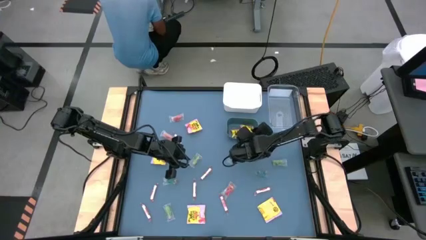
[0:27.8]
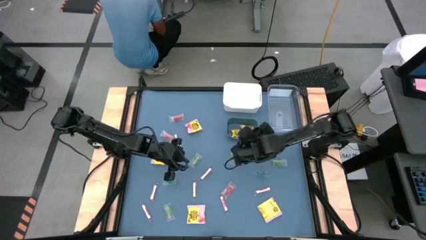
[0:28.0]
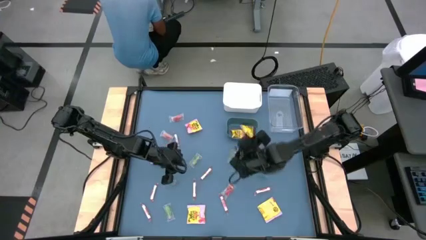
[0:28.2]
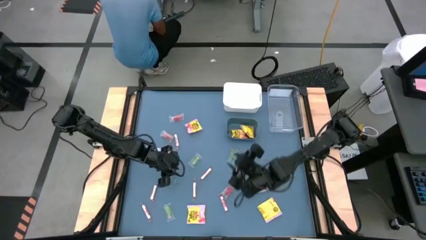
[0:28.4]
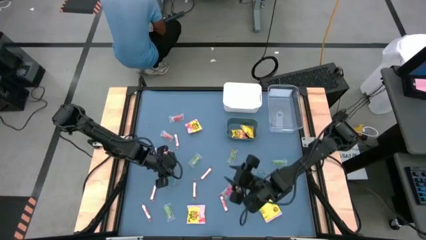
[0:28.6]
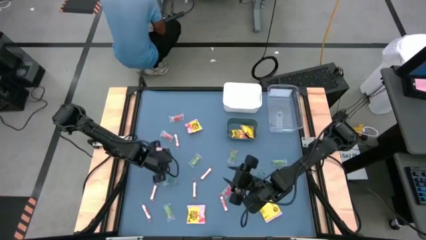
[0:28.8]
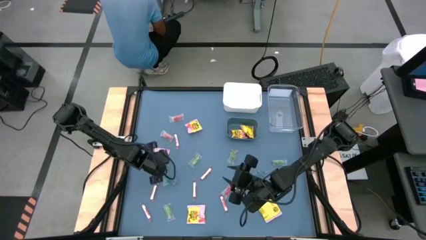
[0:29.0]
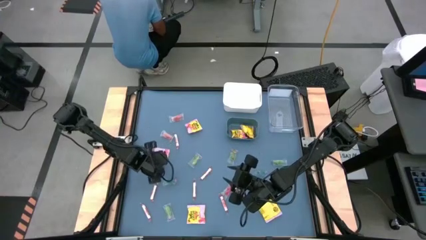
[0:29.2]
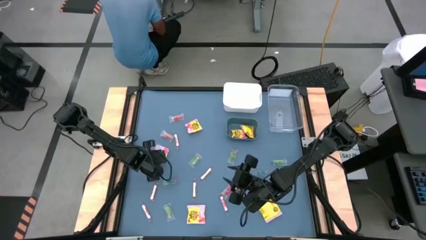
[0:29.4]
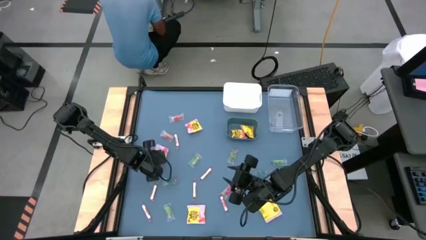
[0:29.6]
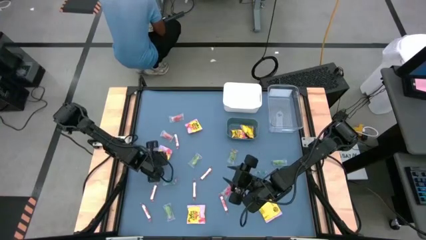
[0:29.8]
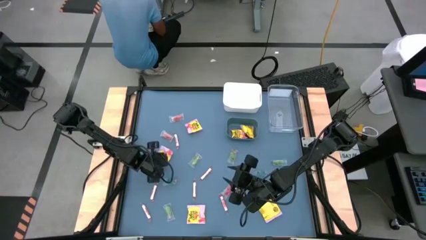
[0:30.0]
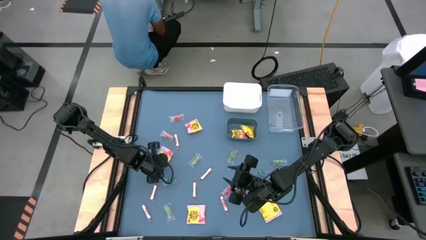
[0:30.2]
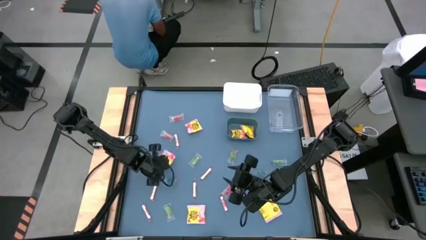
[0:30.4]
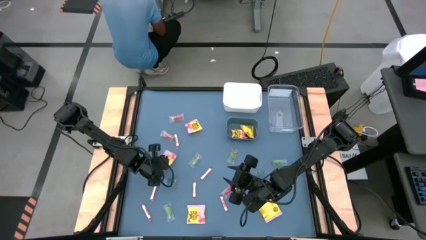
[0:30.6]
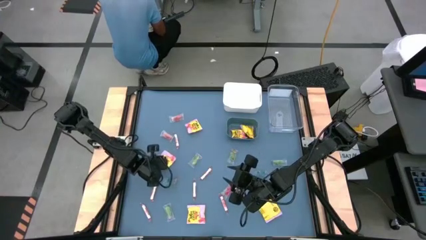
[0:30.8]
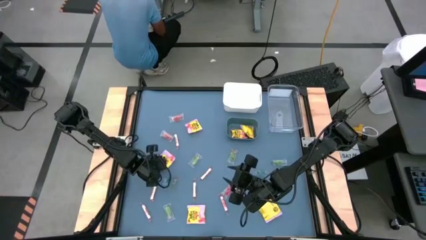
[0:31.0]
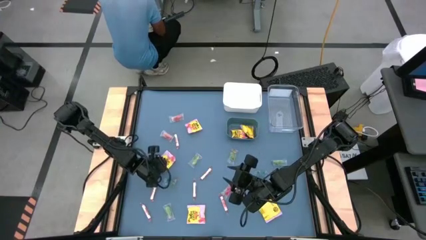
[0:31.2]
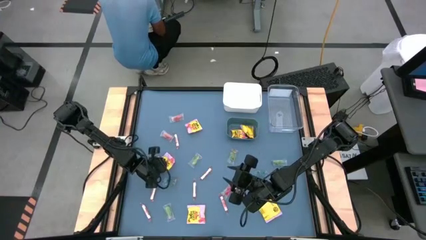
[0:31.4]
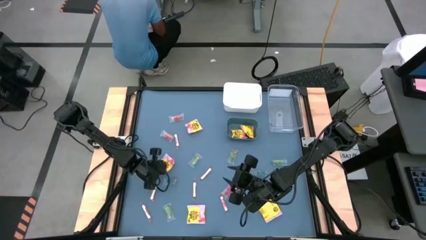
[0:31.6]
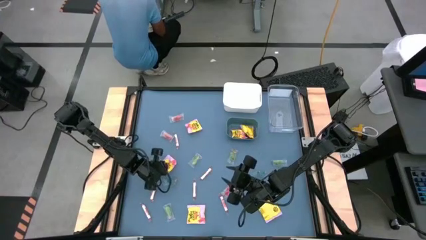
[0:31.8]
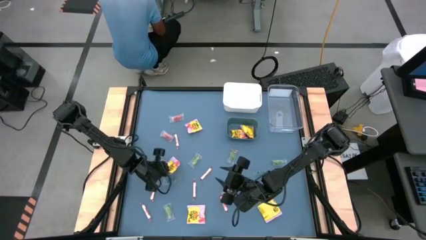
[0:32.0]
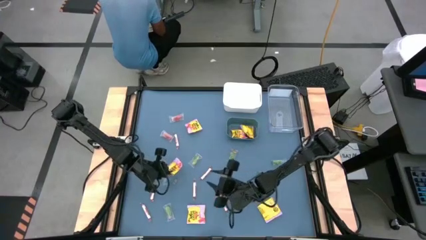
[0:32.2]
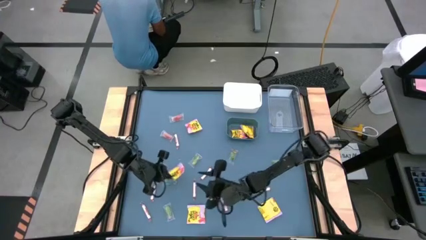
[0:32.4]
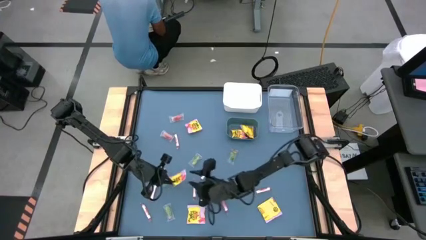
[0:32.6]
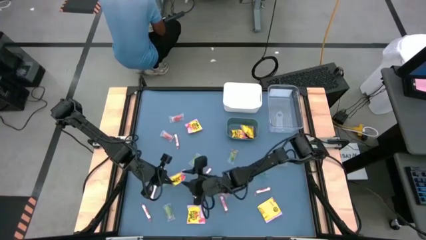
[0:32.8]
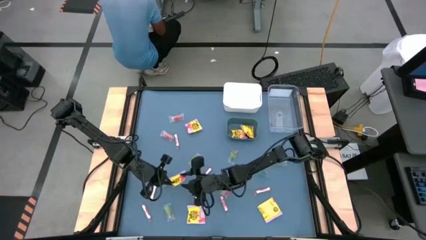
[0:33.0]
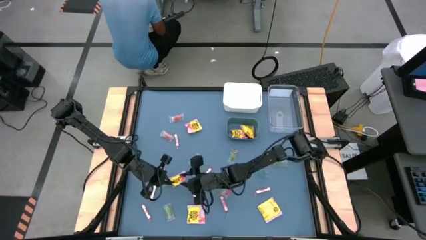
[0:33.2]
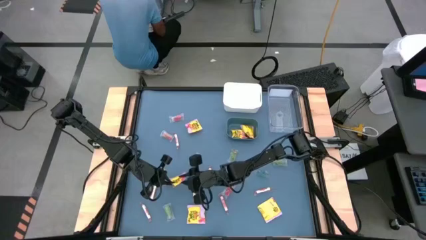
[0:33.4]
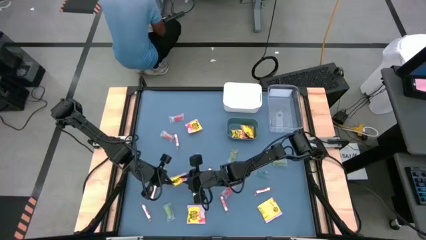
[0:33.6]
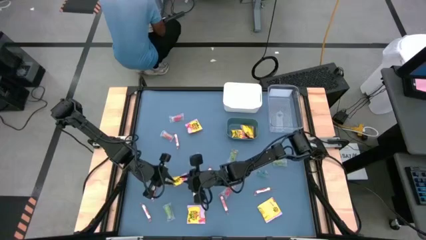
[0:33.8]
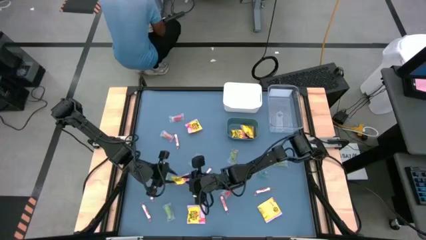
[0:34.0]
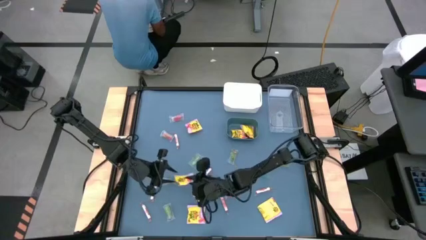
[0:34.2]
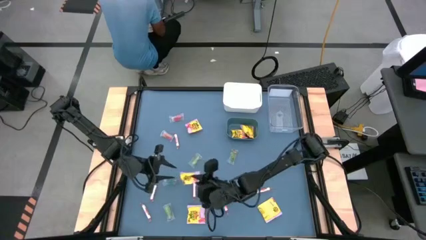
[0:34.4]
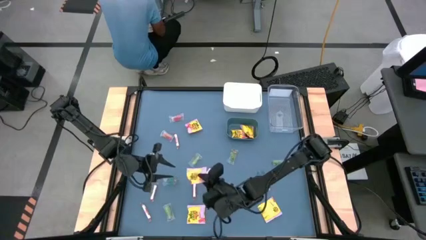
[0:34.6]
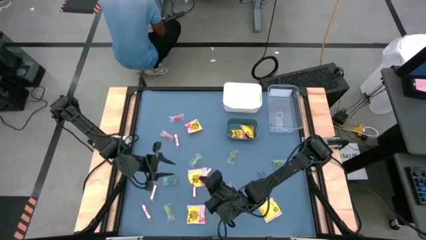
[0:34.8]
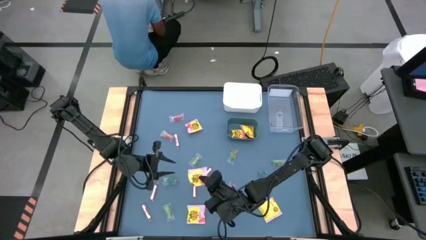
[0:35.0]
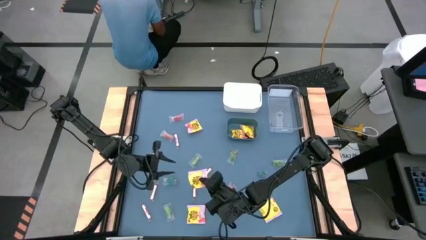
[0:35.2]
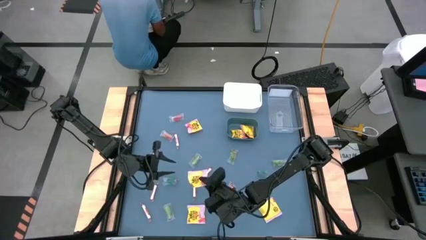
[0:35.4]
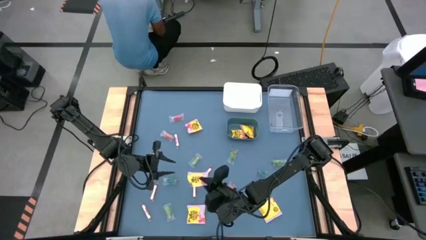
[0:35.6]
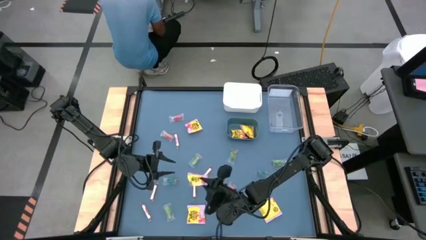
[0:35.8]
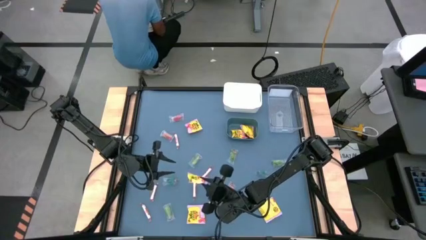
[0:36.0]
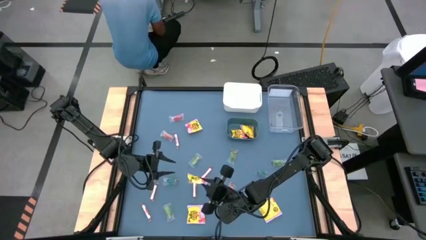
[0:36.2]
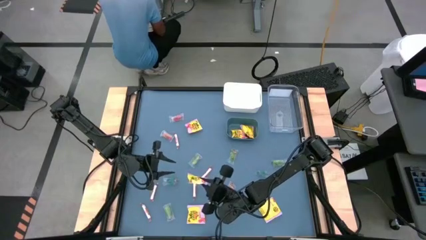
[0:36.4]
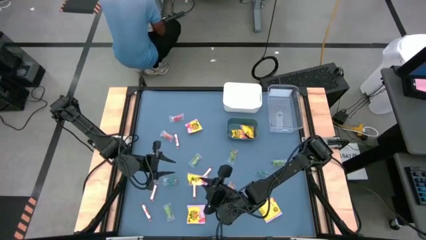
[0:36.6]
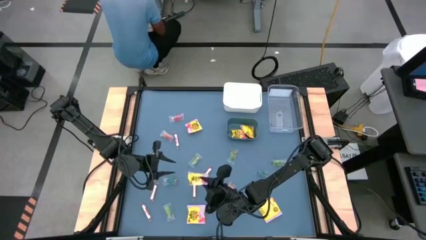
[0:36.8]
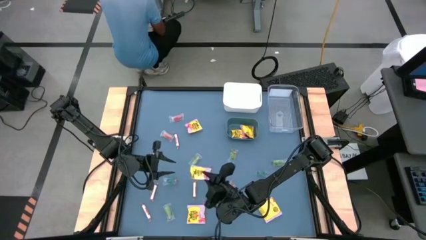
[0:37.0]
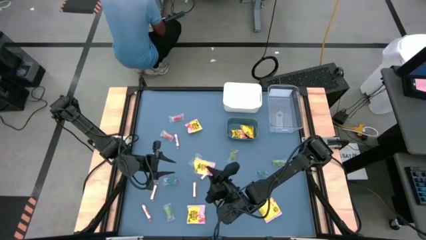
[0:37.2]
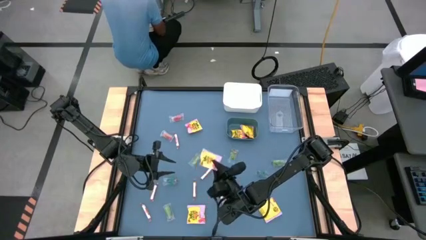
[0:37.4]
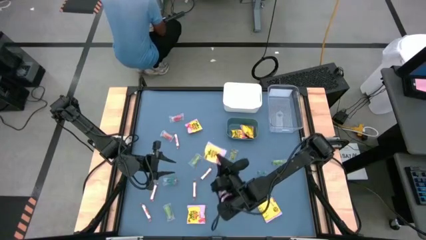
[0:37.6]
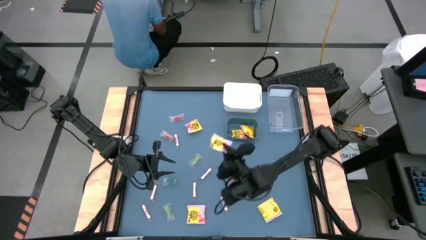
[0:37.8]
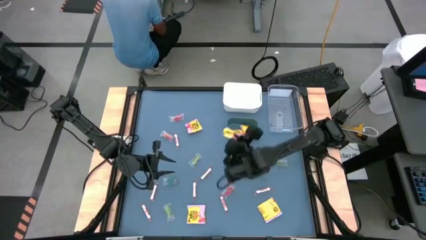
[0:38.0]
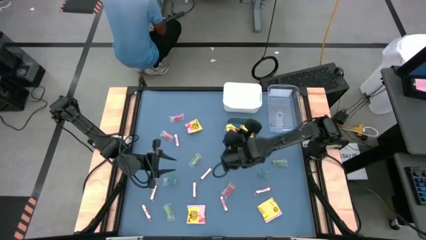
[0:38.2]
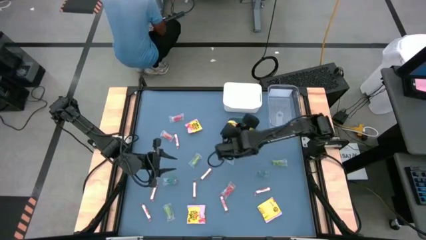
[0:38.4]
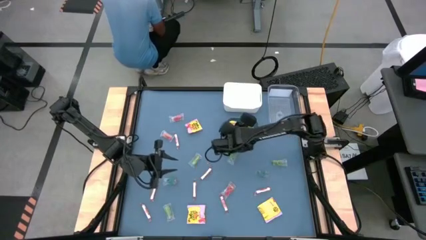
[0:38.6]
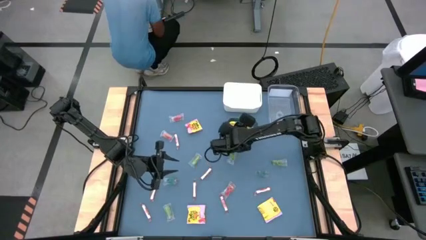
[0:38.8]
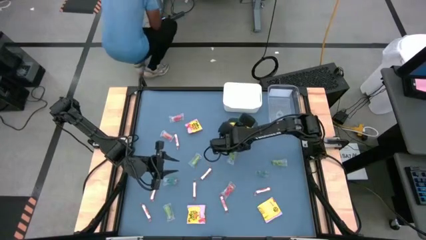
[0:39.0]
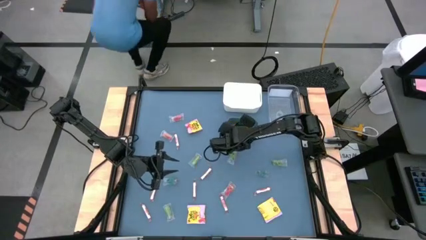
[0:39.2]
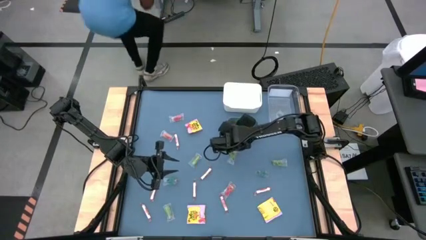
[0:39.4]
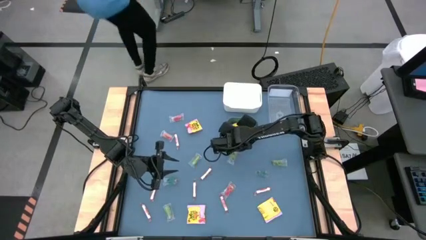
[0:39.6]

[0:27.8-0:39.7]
Task: Sort candy
Put the middle left yellow candy into the green bin

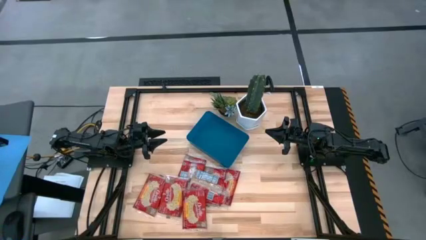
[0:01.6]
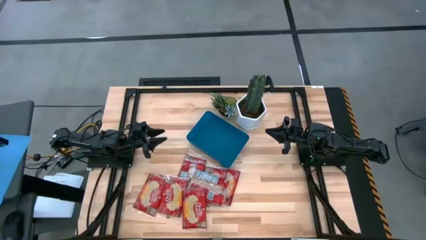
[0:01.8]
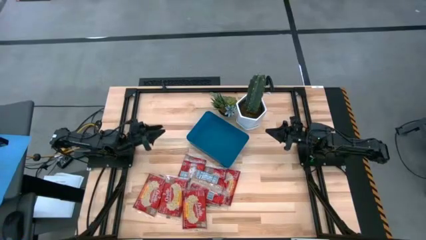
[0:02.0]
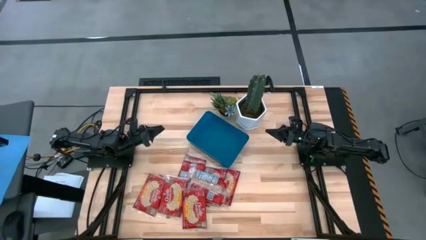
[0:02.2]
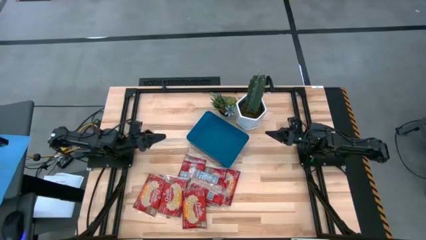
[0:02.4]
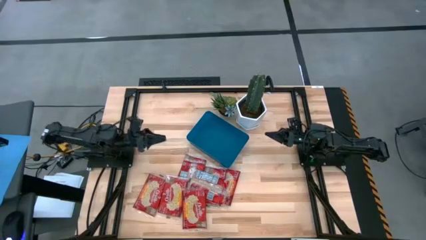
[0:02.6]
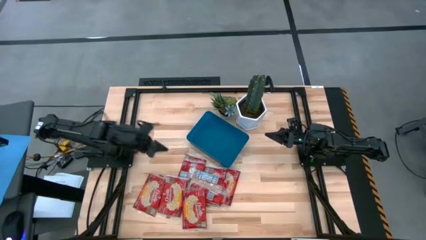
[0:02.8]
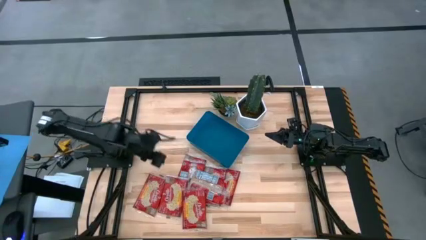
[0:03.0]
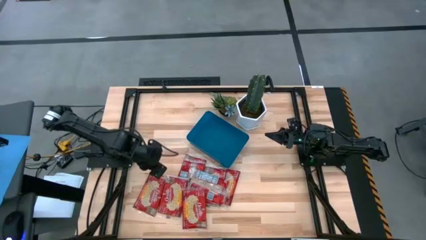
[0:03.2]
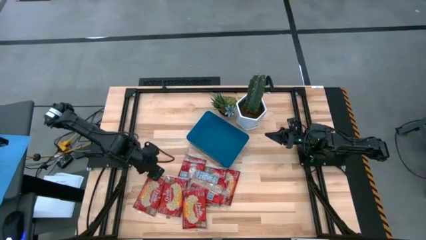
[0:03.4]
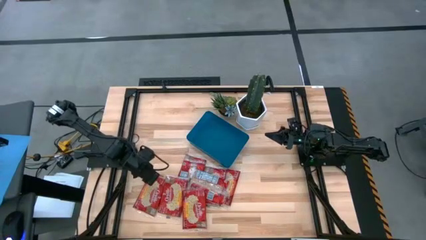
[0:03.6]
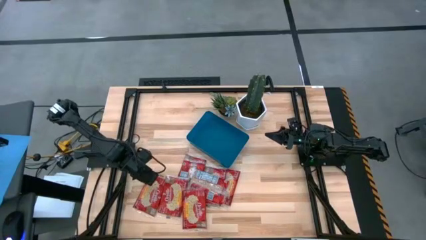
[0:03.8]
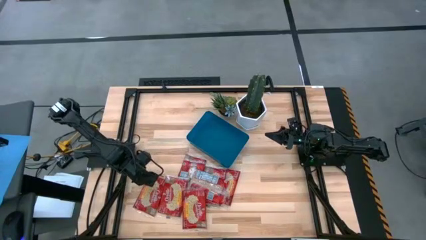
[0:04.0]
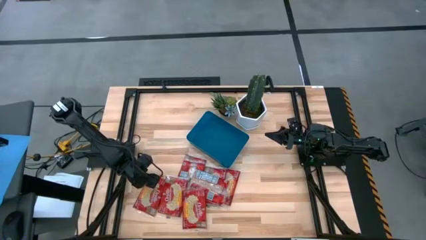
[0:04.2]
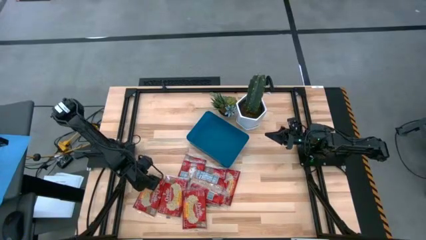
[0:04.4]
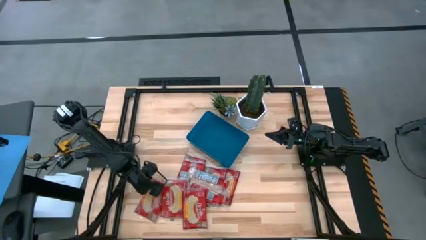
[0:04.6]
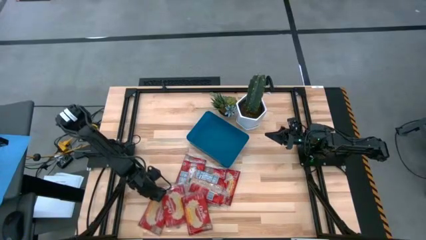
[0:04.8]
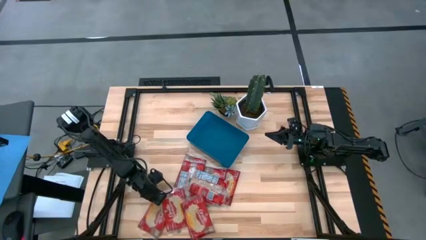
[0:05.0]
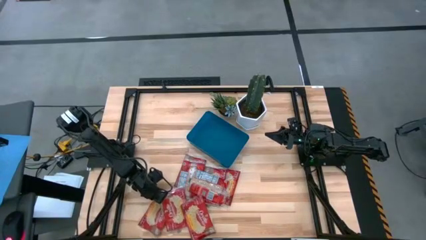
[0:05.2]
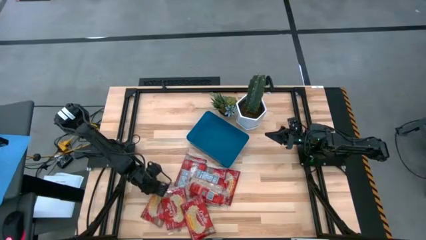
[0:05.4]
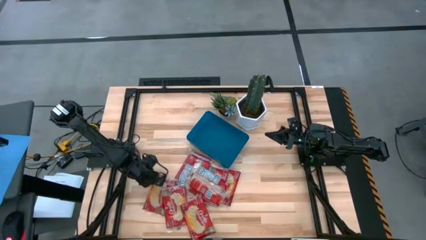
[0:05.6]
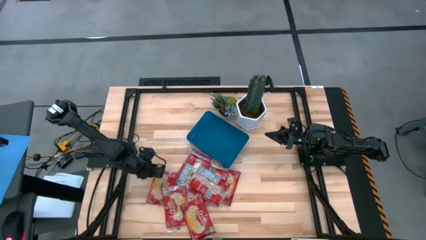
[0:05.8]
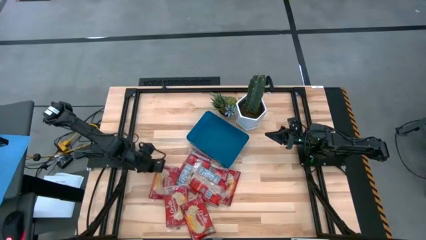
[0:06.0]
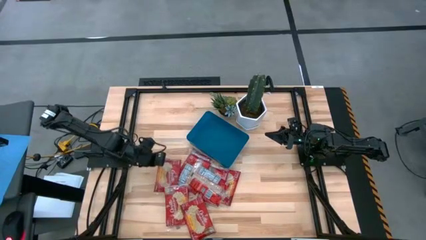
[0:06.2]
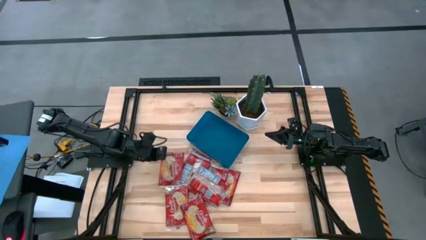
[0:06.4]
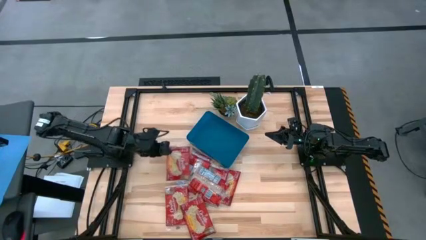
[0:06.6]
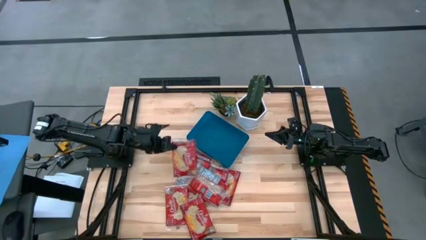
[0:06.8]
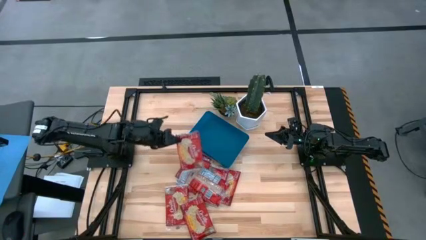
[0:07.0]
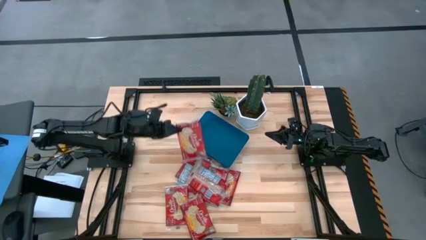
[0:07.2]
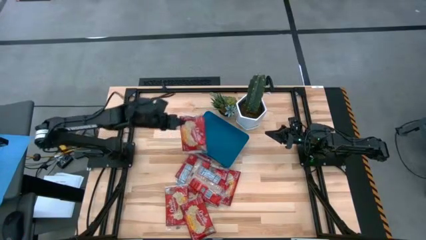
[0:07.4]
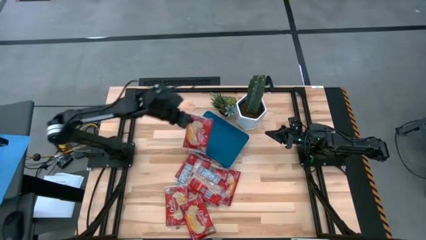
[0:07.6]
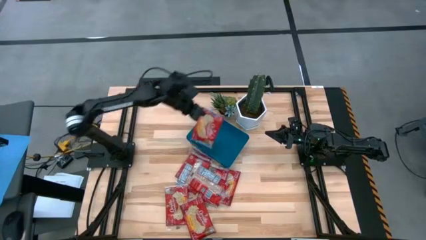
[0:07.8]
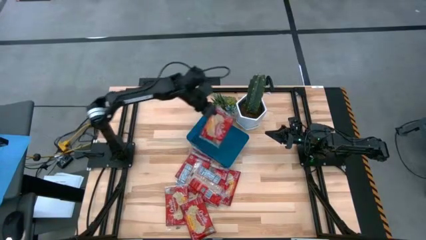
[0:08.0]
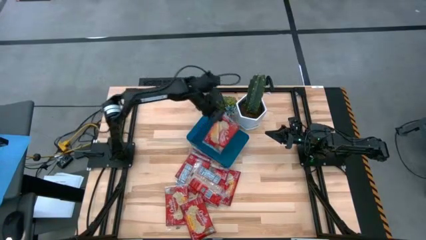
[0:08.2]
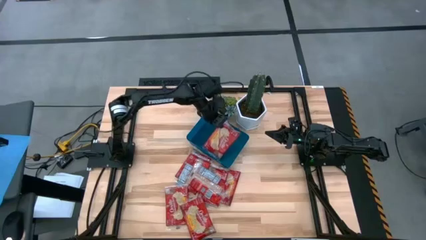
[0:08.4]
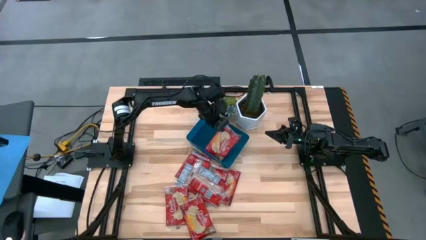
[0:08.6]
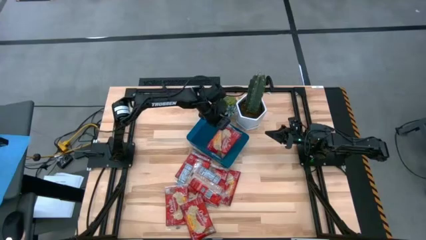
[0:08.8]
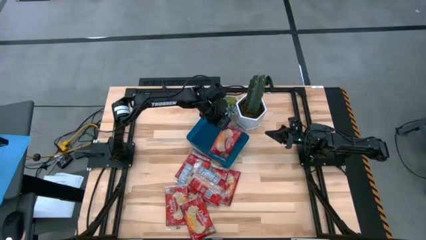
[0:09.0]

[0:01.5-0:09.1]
Task: Sort popcorn bags into baskets
Put the popcorn bag into the blue bin
